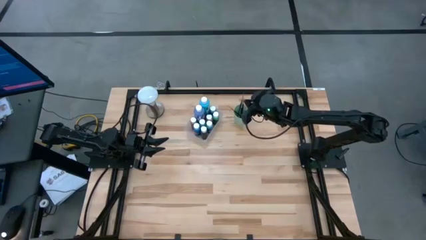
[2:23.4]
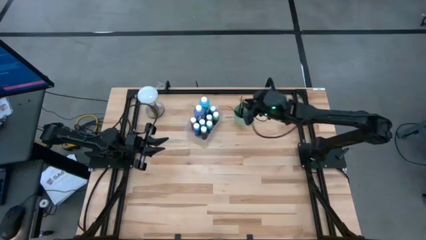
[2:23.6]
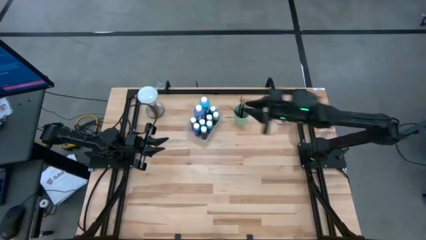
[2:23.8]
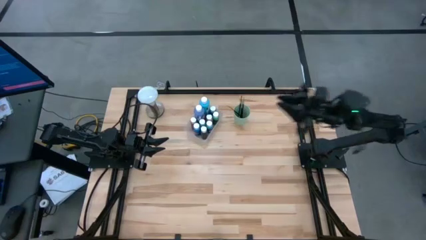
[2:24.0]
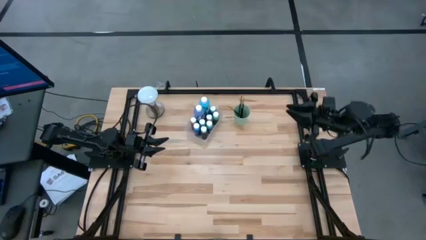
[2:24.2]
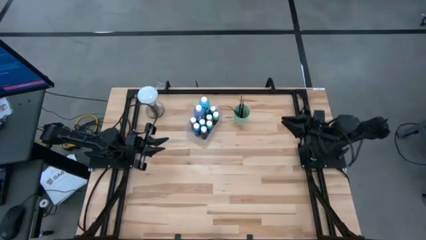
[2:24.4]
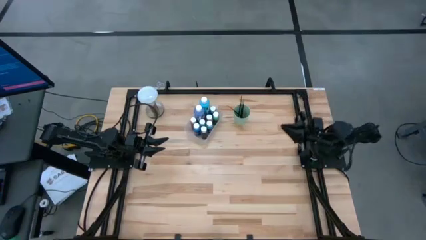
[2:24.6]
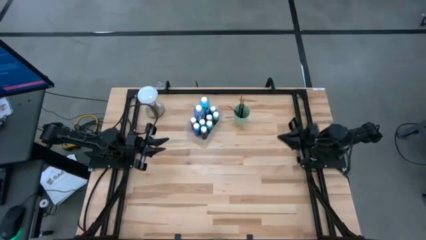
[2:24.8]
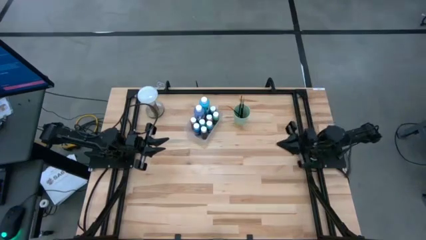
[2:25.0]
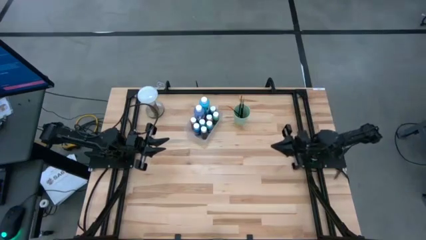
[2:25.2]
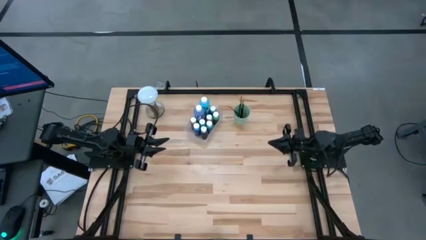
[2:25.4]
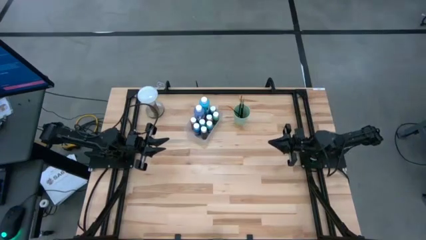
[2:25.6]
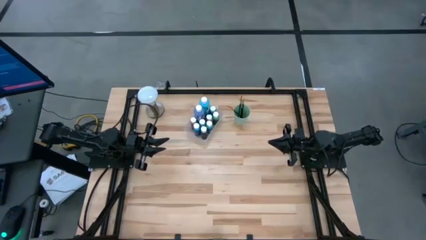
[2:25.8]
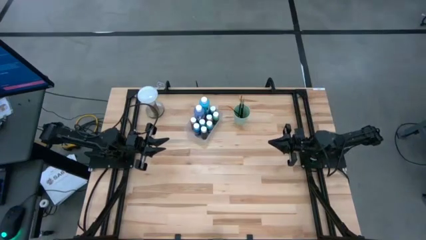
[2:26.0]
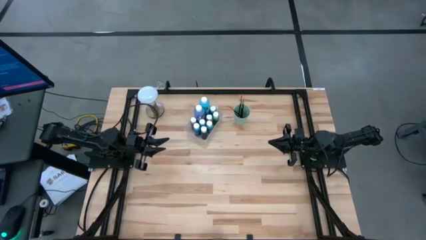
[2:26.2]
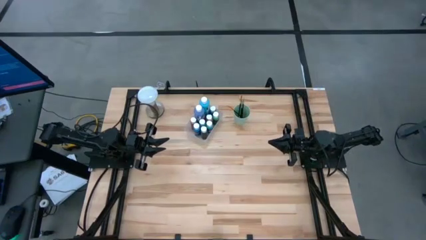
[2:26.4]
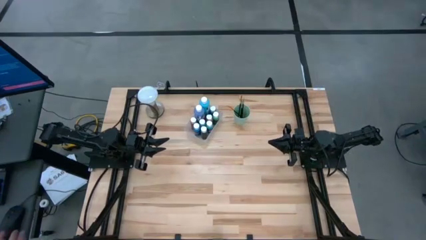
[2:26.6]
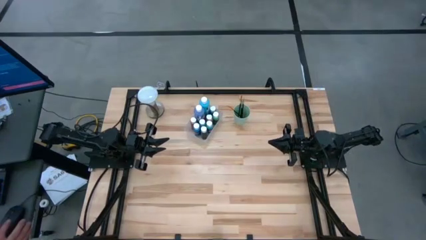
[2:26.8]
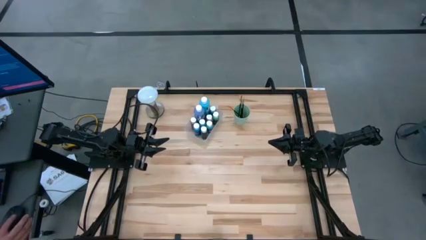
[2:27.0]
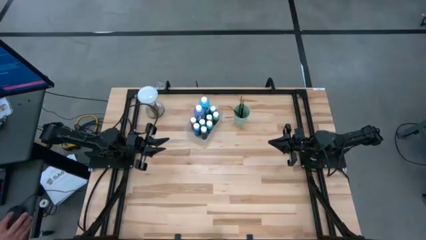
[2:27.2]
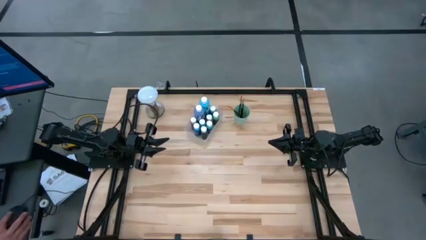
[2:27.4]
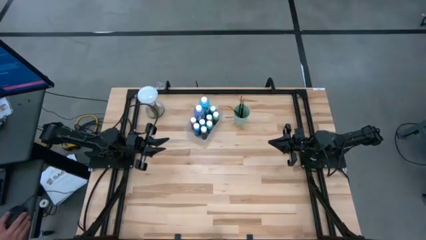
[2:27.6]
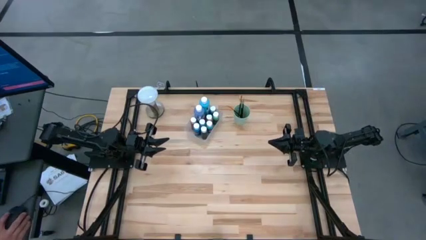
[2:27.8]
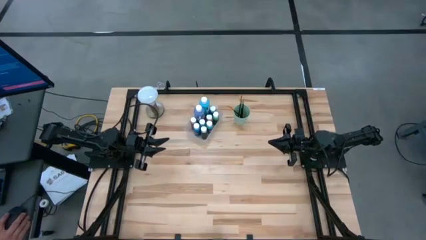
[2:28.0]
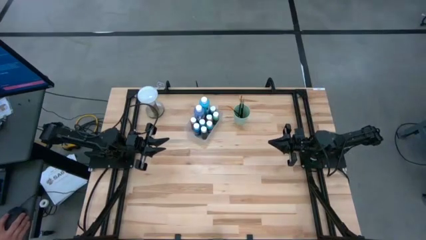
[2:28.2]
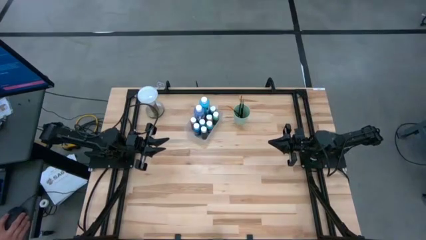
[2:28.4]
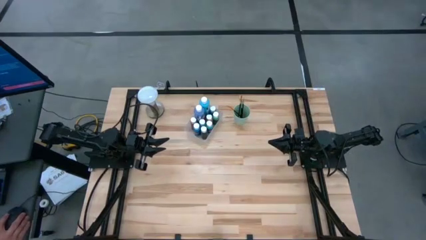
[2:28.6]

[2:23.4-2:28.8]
Task: Pick & Place Paint Supplies
Return to Home Position

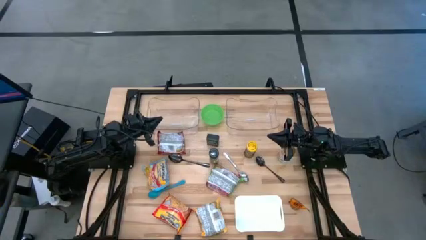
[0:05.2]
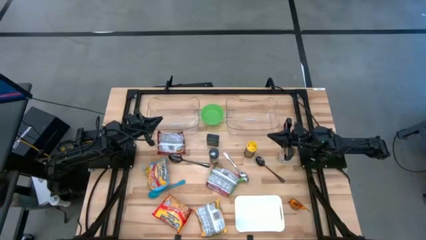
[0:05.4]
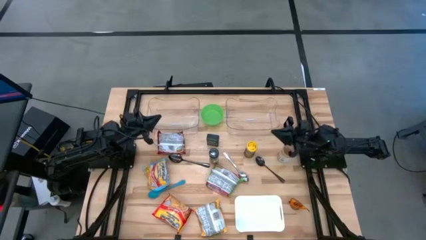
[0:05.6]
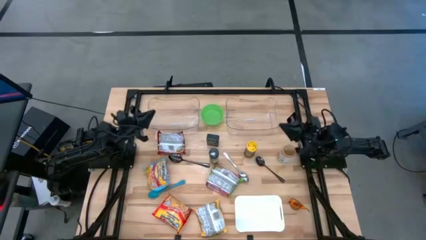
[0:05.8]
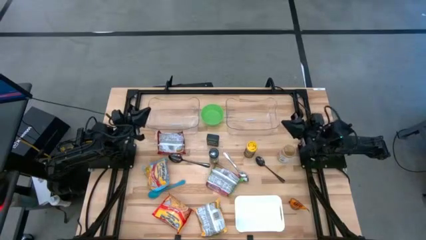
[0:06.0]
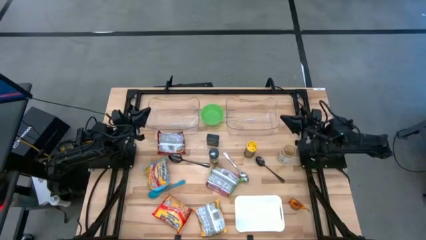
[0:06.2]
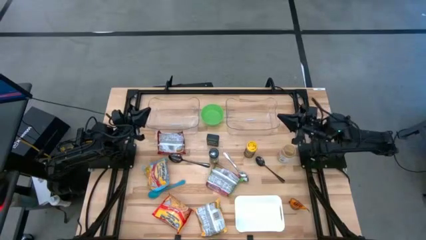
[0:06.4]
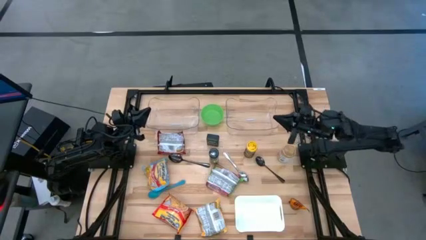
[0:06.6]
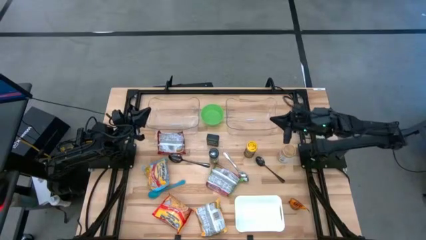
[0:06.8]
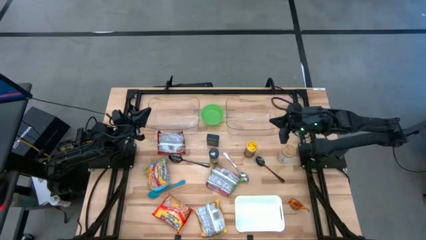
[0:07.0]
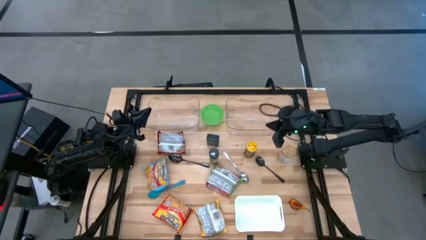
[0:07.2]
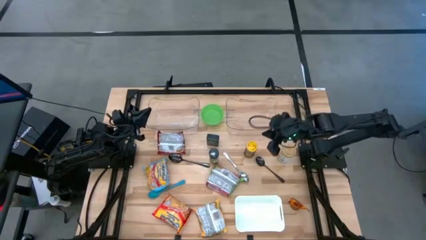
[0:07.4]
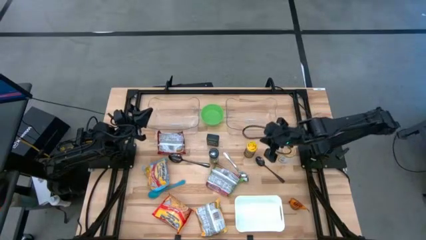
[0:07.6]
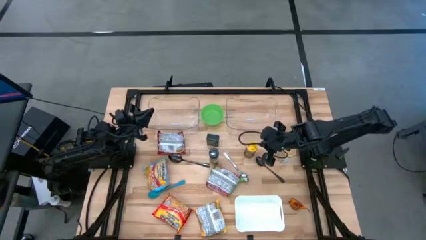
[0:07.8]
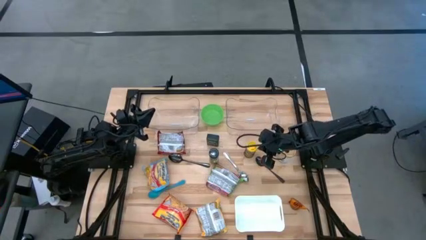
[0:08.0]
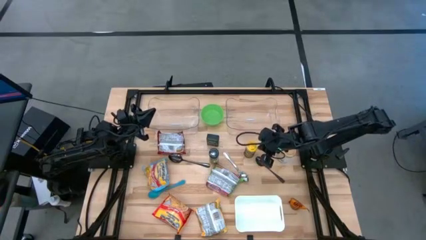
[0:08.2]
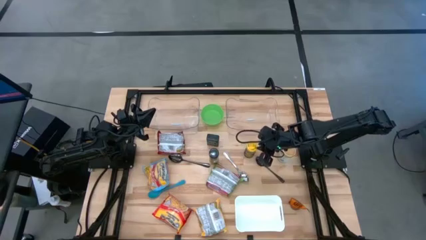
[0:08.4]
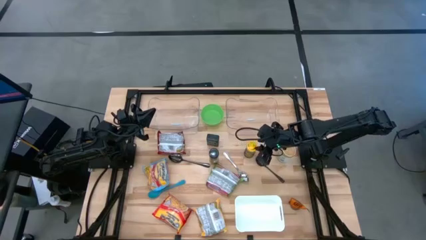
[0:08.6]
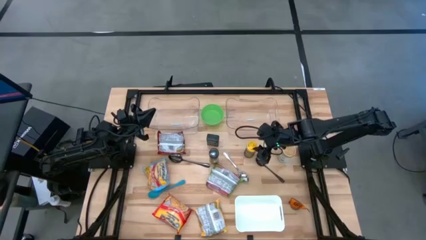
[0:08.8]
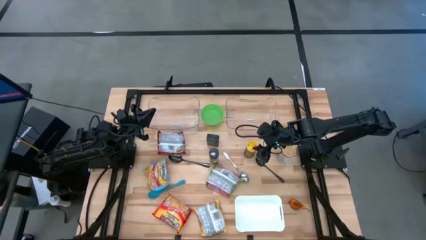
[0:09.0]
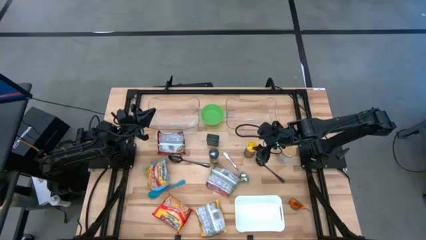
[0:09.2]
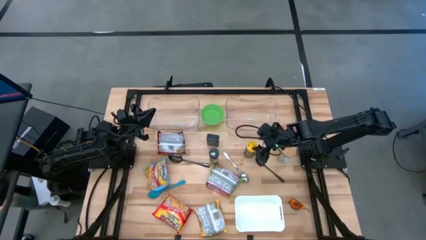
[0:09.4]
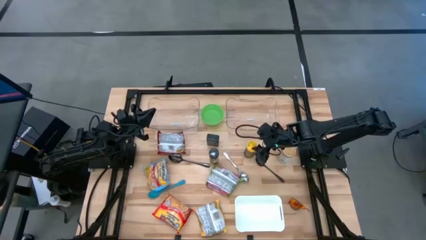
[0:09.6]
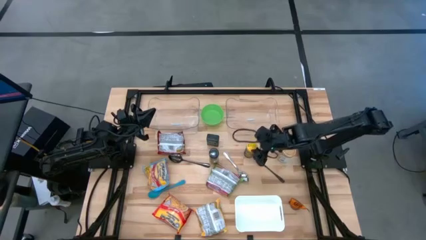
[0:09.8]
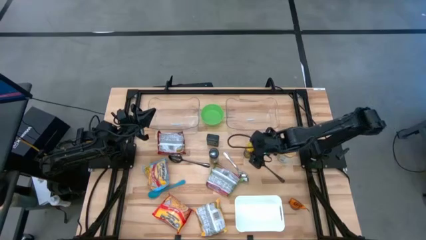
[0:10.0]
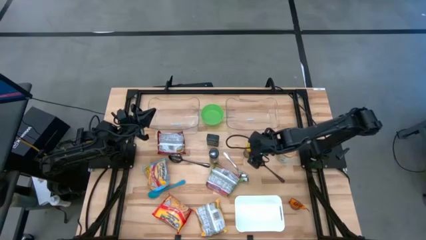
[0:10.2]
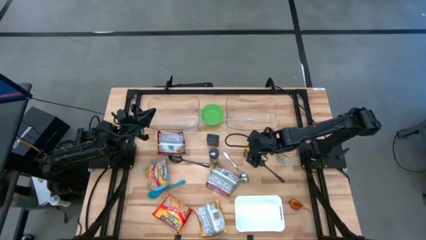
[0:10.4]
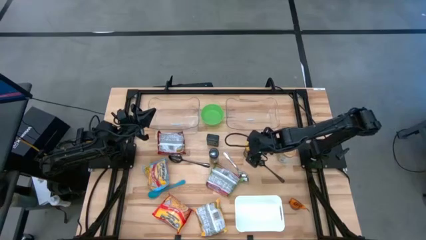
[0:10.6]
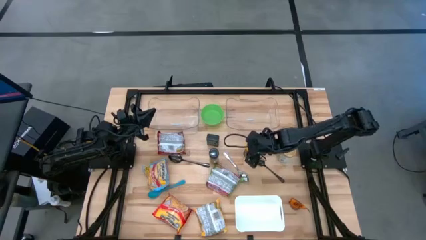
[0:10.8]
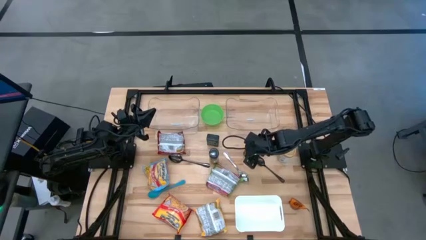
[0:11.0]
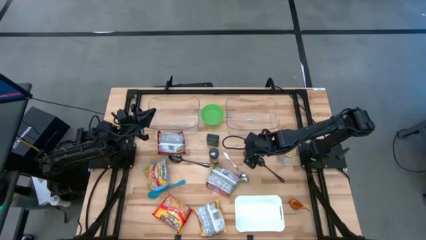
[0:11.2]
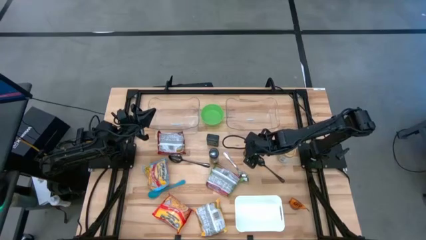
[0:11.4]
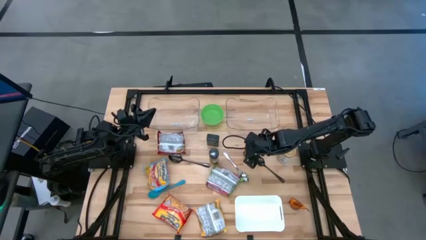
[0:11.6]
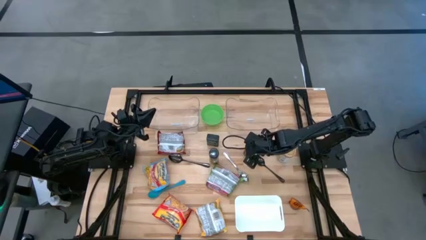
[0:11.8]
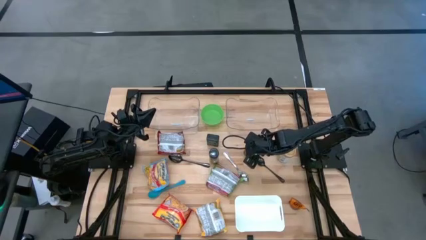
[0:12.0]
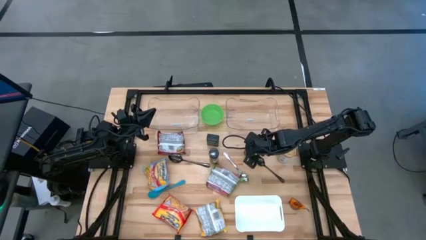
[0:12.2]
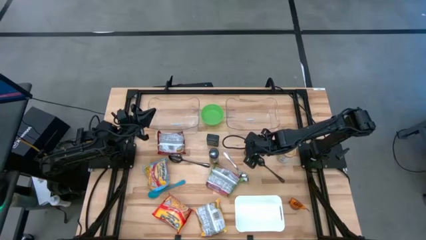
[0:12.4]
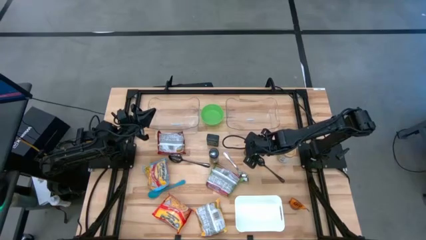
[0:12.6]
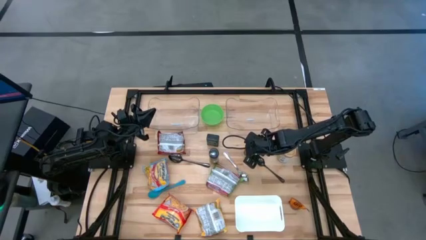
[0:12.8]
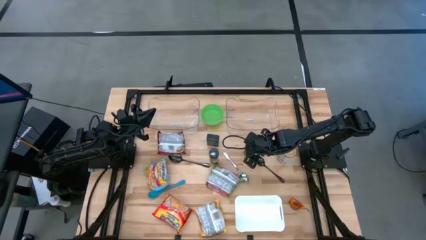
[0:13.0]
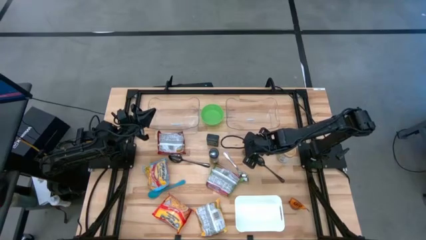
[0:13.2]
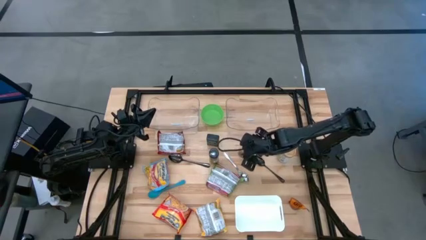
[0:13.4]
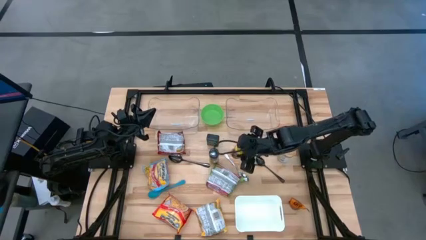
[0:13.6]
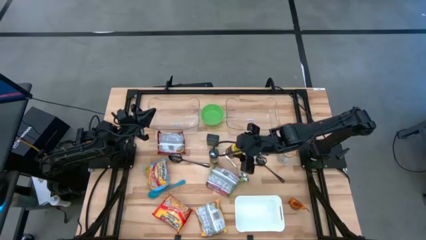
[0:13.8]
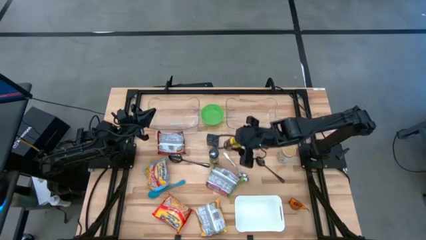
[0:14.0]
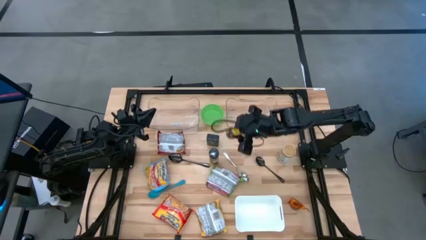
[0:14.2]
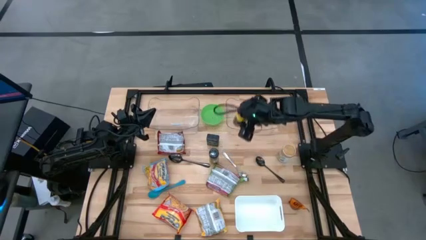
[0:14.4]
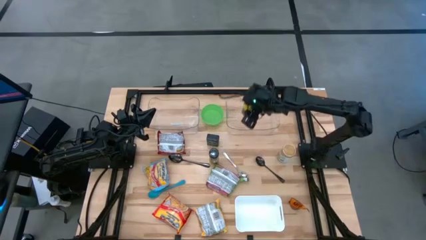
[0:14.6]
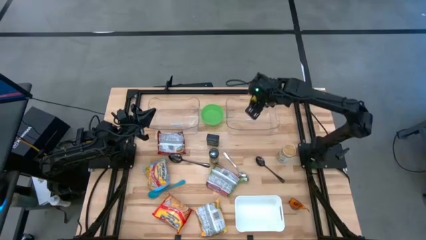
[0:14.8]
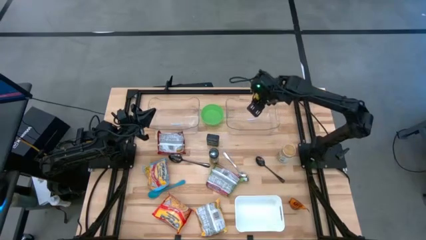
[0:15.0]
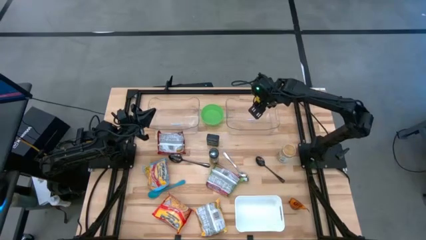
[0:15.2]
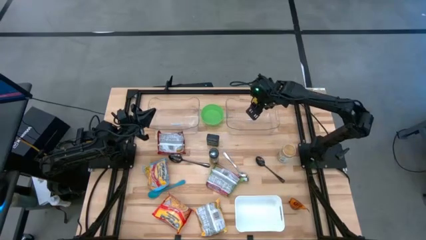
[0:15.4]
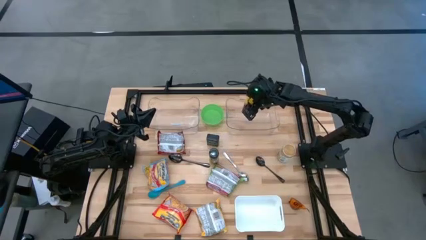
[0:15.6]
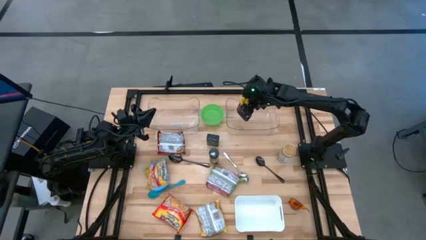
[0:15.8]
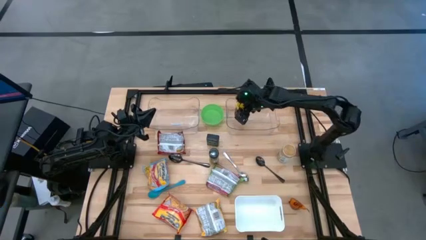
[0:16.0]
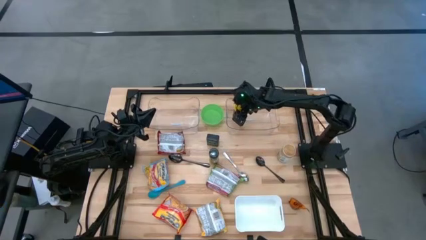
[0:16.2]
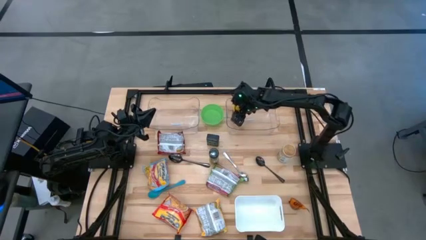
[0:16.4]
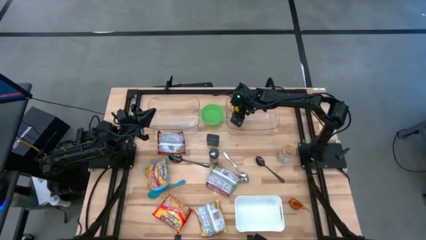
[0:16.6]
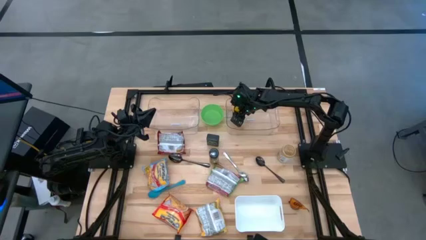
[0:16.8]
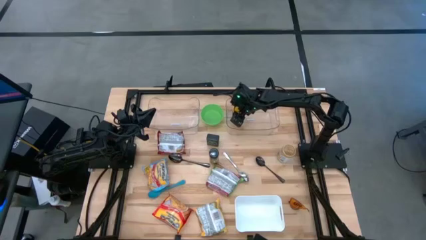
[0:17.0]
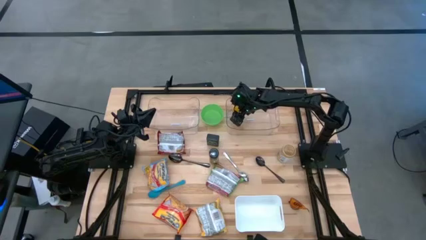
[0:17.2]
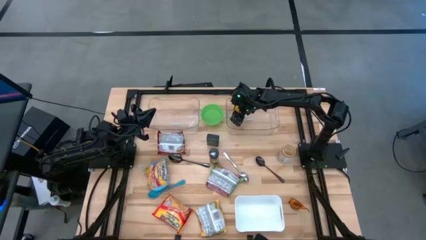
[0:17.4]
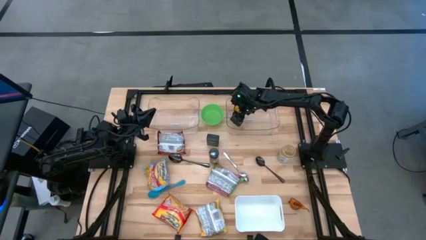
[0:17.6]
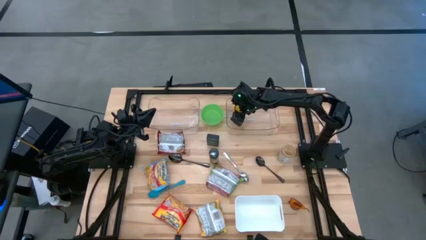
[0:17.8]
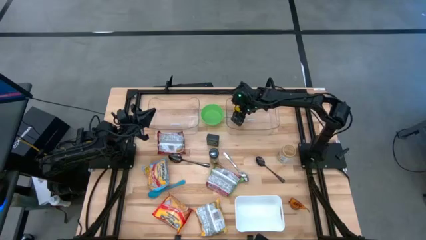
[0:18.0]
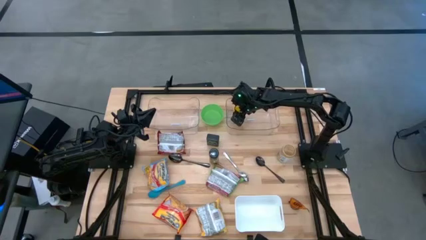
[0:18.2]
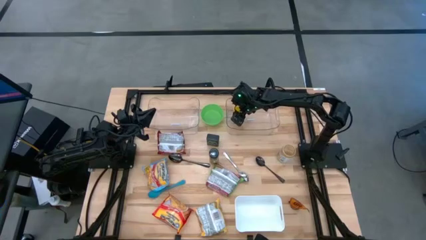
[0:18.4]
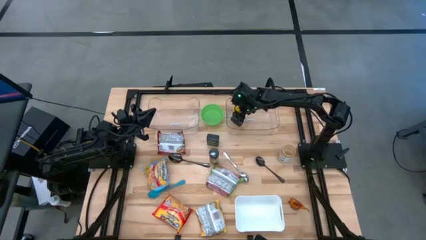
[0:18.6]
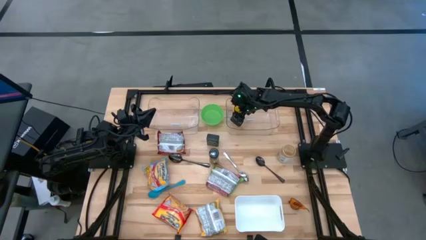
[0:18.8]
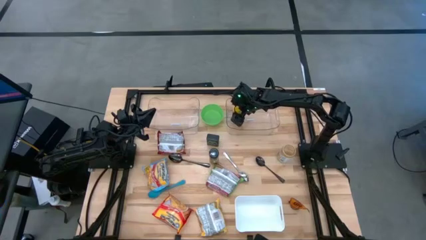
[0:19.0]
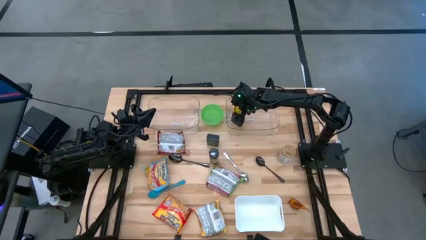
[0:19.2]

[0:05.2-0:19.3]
Task: Pick & Place Food Item
Put the brown spice bottle in the right transparent bin
